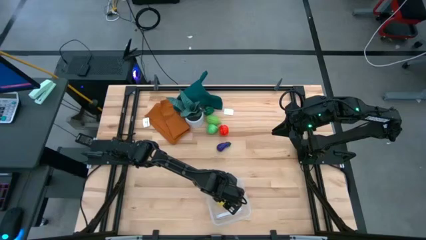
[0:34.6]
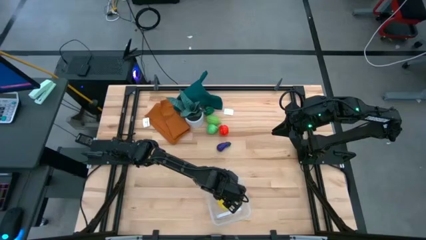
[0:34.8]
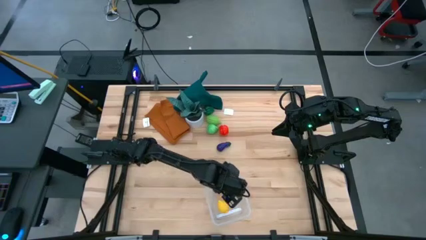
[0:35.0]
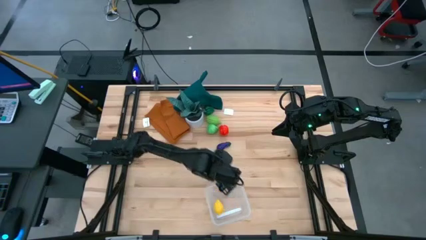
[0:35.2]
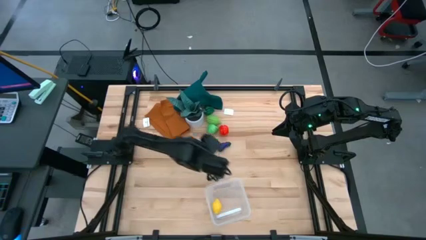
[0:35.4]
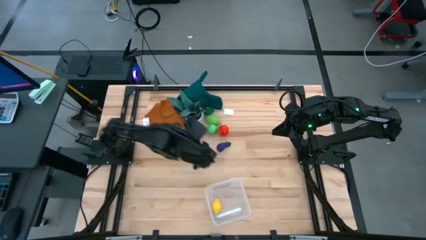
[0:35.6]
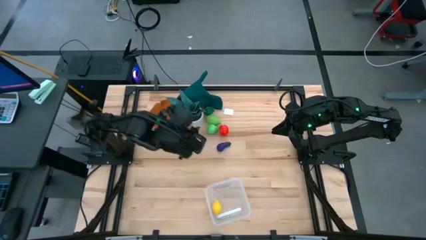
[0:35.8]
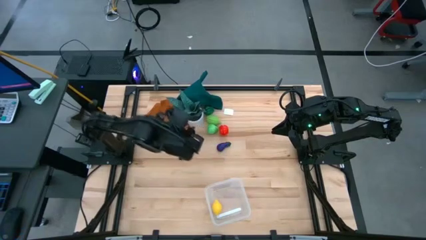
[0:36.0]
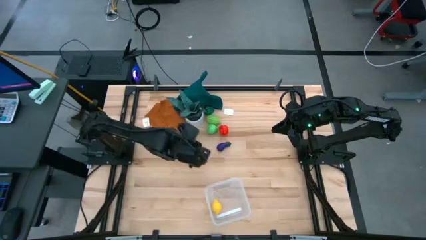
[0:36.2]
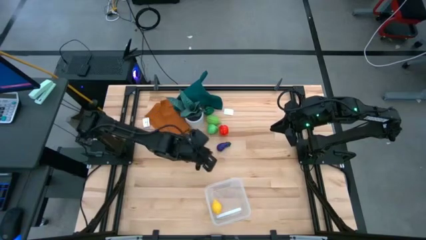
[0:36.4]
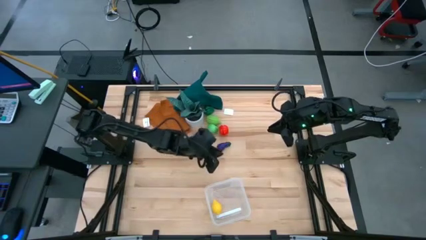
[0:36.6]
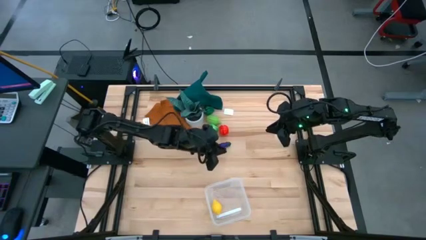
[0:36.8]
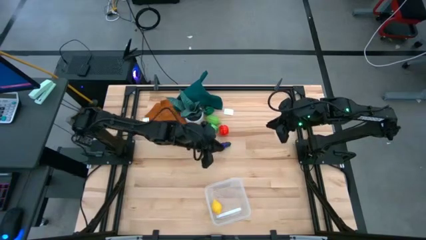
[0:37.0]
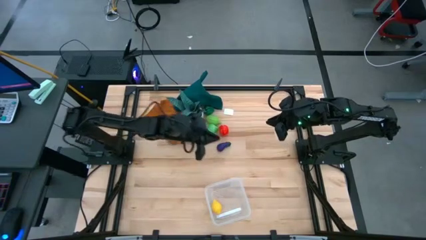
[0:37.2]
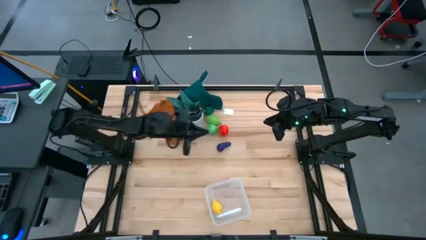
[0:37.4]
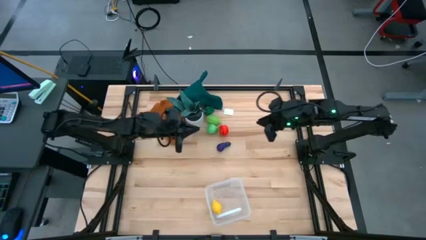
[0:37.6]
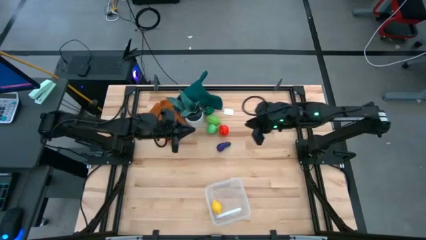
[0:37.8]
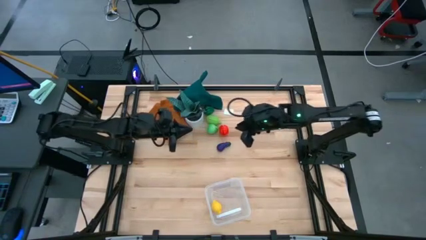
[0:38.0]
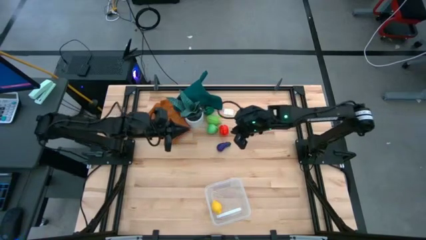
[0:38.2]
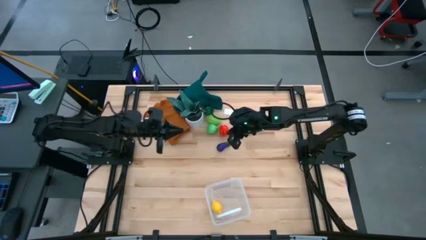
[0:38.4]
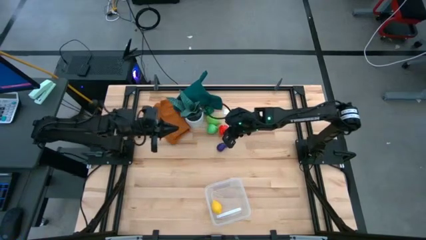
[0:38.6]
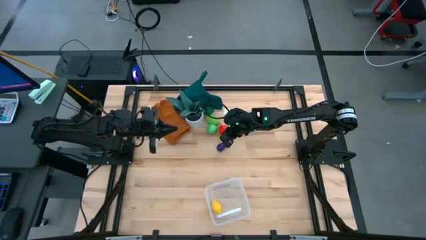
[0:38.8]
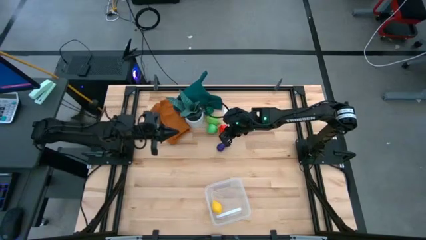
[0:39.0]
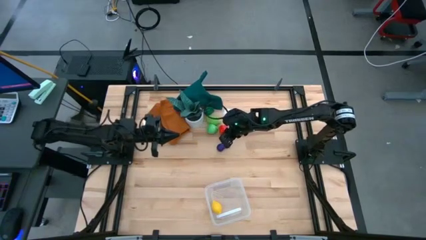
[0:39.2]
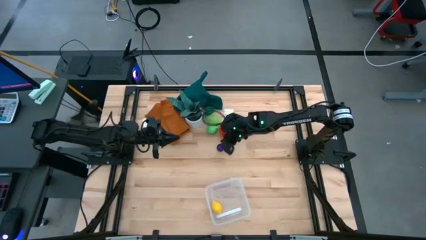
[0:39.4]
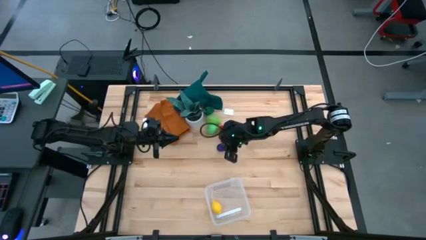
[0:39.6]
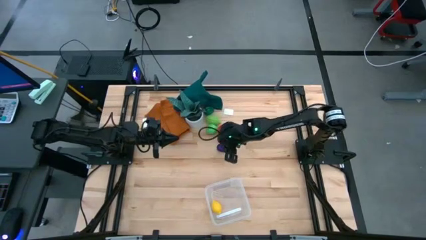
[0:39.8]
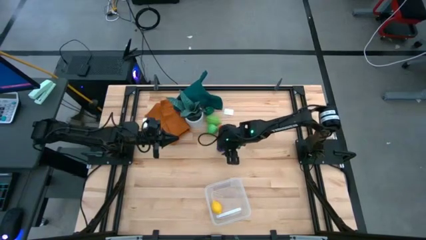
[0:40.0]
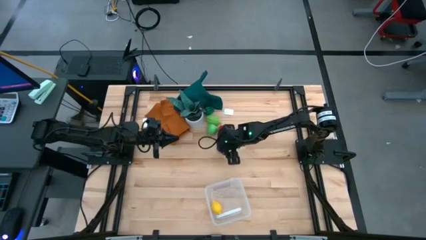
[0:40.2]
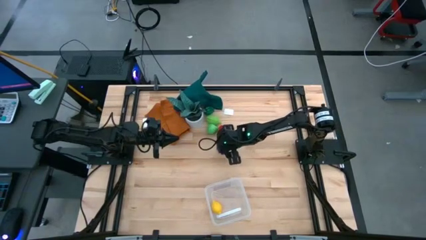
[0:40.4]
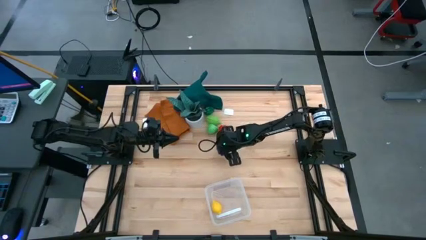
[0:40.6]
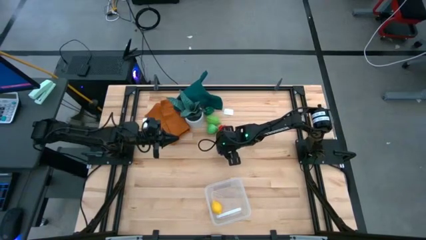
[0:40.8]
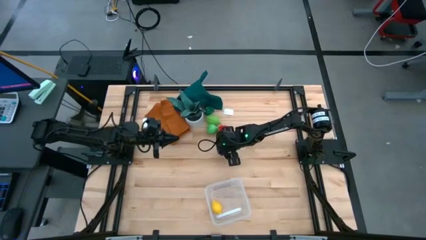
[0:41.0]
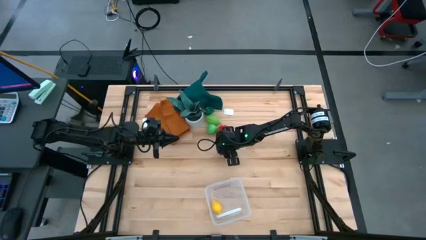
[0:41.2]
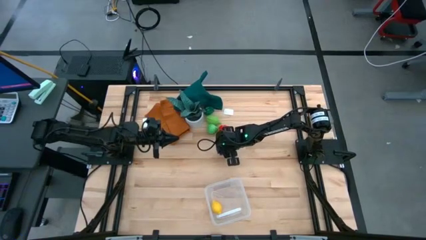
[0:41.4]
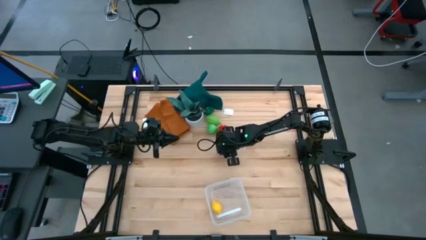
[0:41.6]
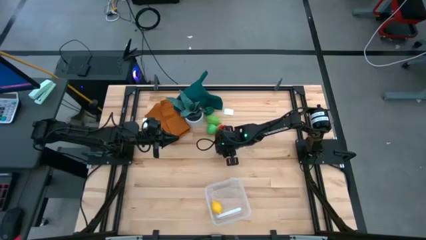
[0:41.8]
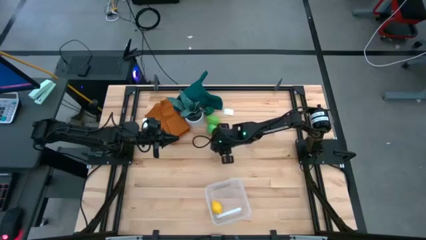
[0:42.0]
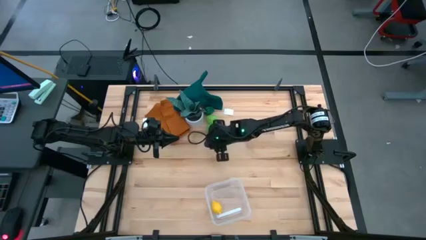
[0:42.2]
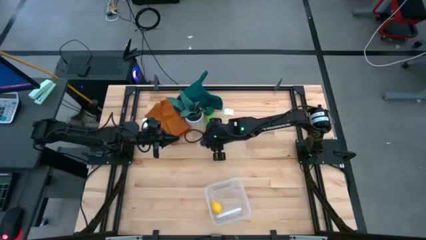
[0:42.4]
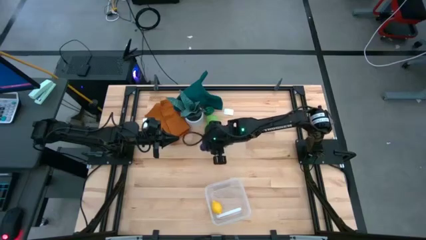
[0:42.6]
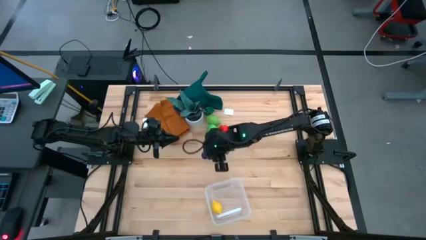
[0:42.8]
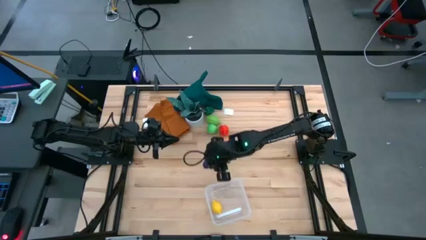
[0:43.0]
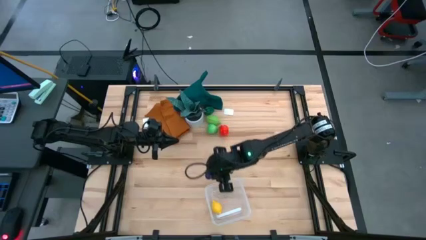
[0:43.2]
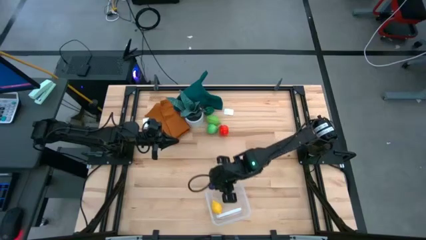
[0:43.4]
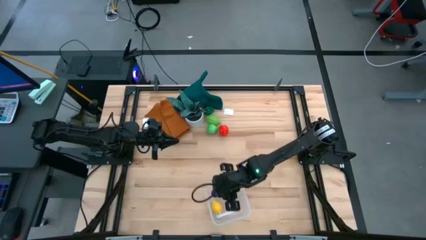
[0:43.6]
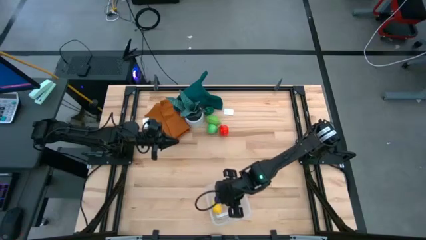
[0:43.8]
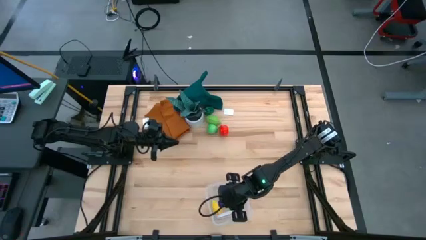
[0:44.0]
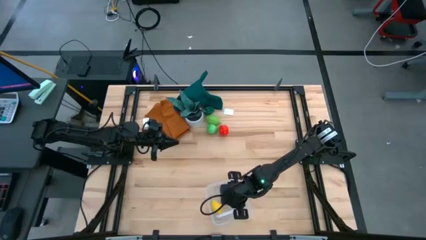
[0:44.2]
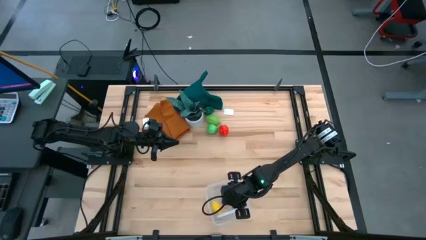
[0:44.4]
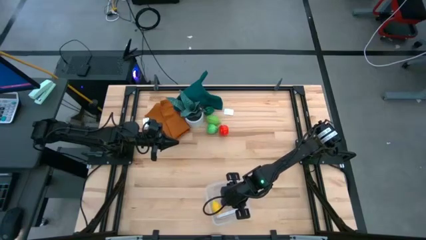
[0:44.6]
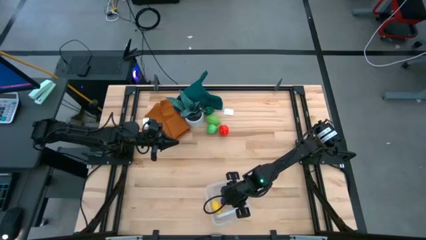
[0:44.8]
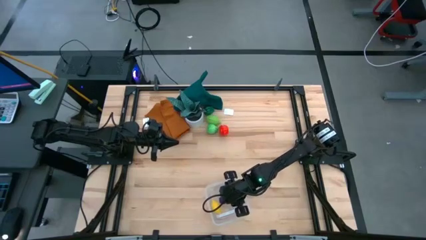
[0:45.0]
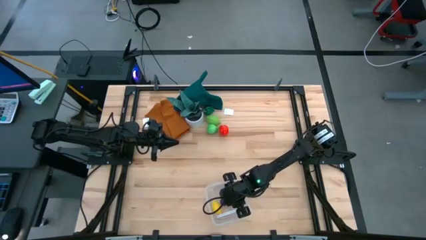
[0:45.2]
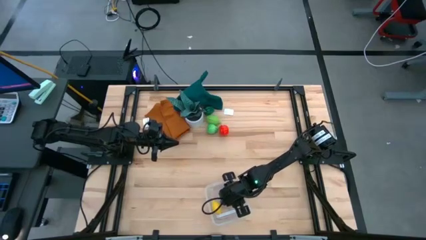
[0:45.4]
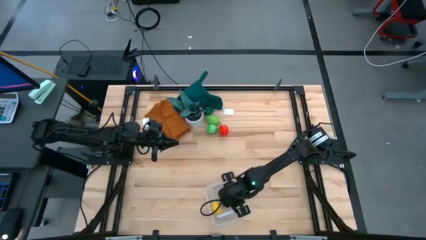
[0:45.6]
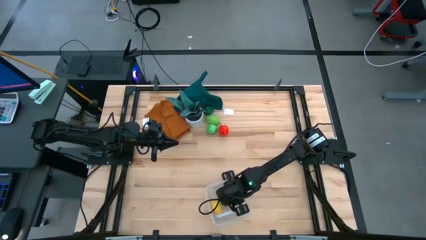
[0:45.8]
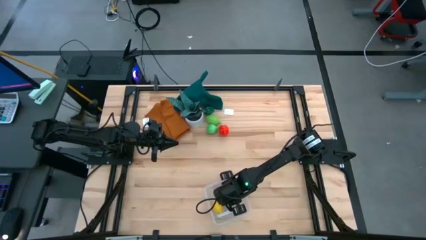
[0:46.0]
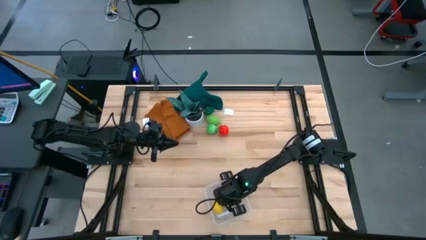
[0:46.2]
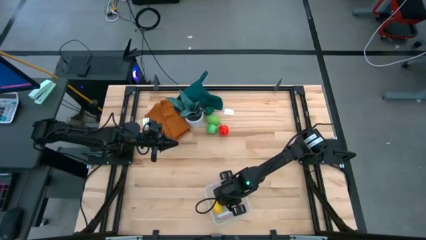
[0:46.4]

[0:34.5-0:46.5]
Task: Pick and placing Produce into tupperware
Put the eggplant into the transparent bin
